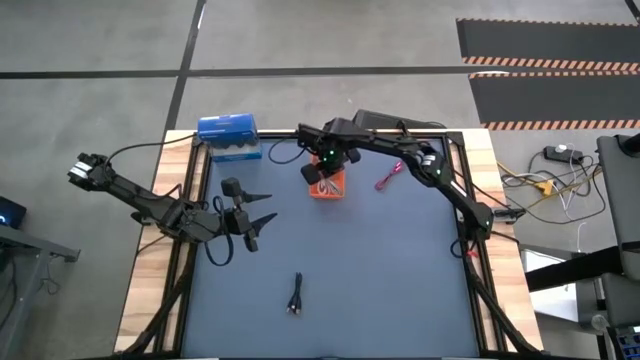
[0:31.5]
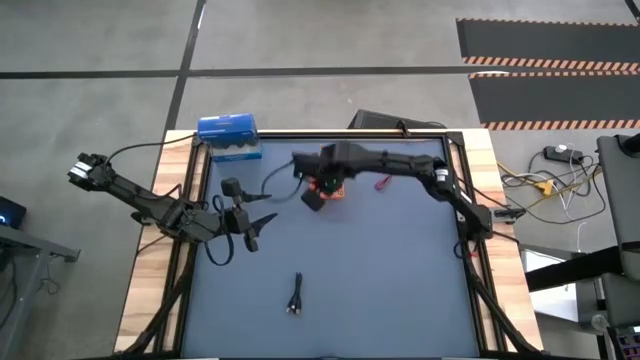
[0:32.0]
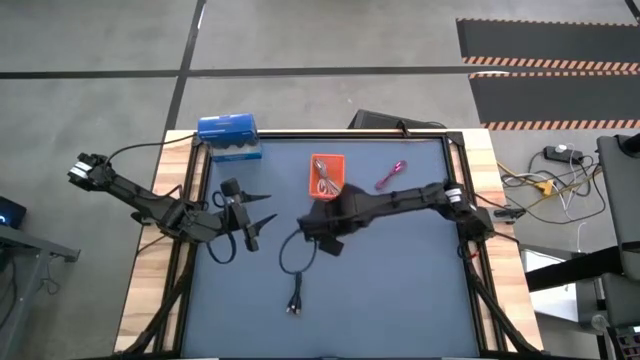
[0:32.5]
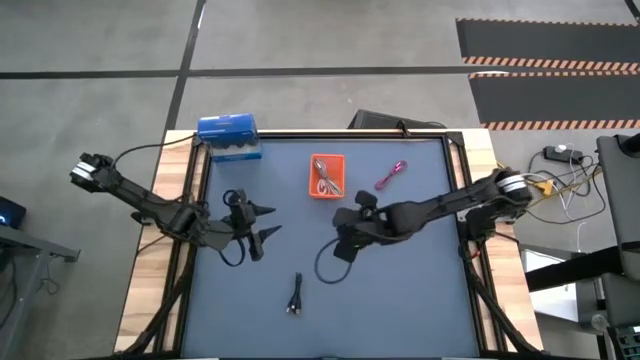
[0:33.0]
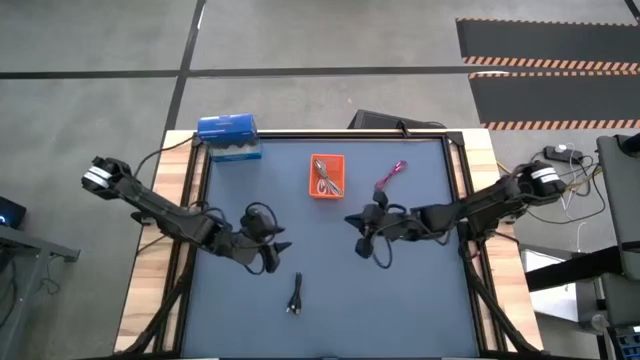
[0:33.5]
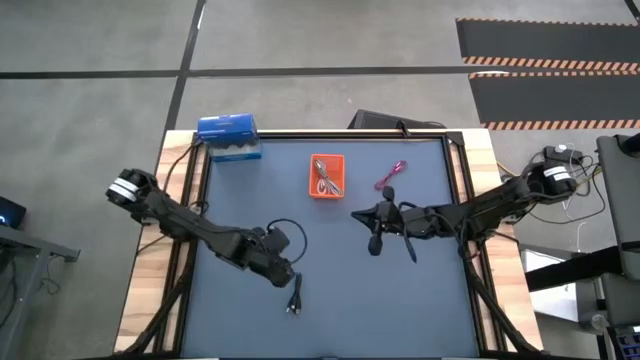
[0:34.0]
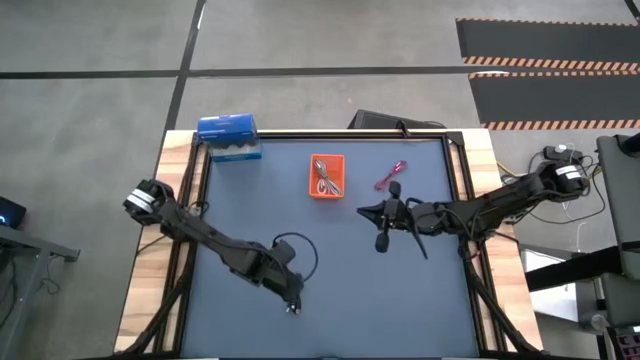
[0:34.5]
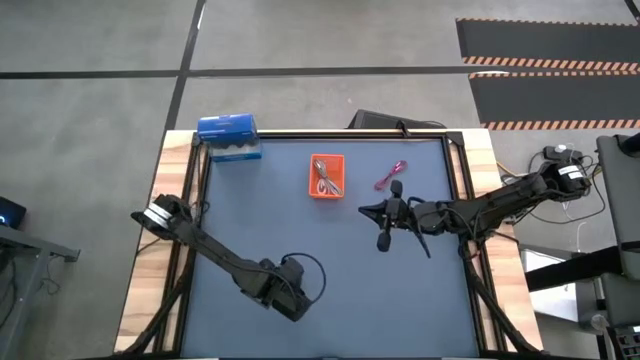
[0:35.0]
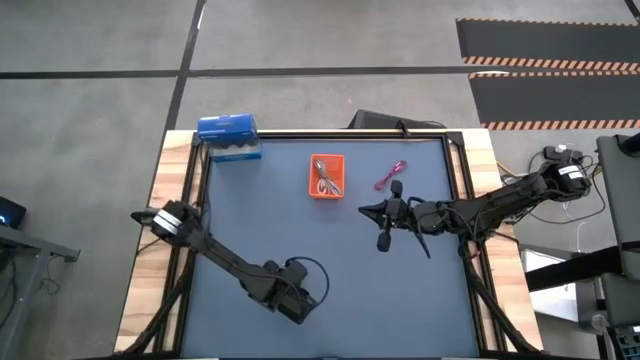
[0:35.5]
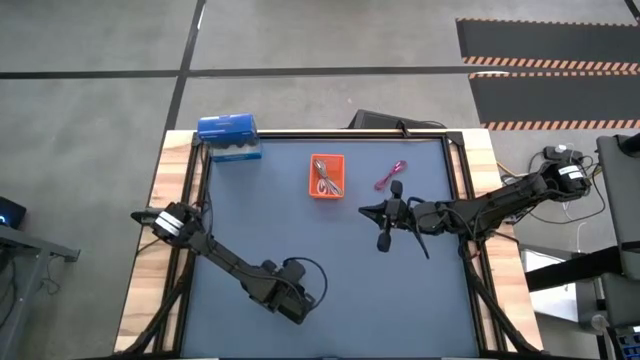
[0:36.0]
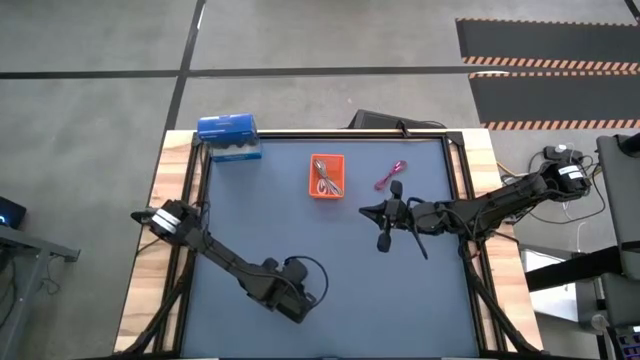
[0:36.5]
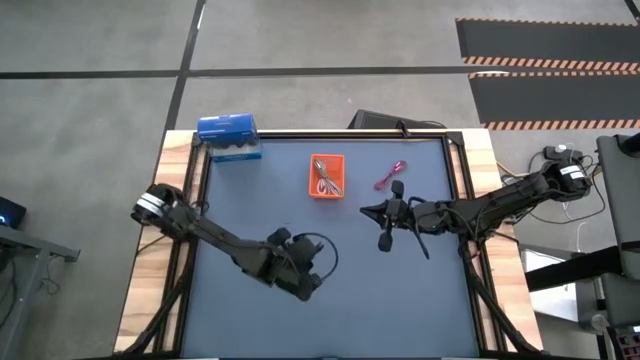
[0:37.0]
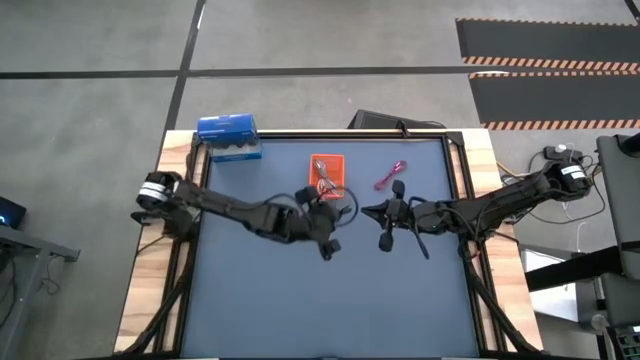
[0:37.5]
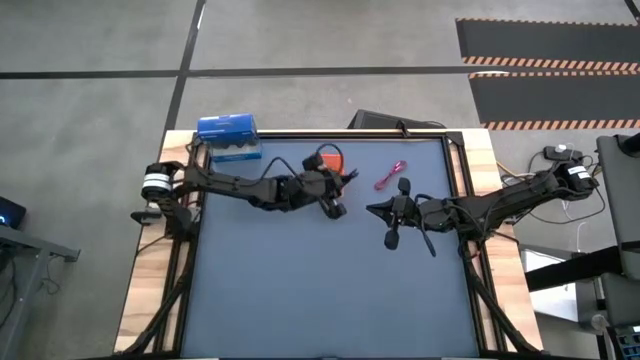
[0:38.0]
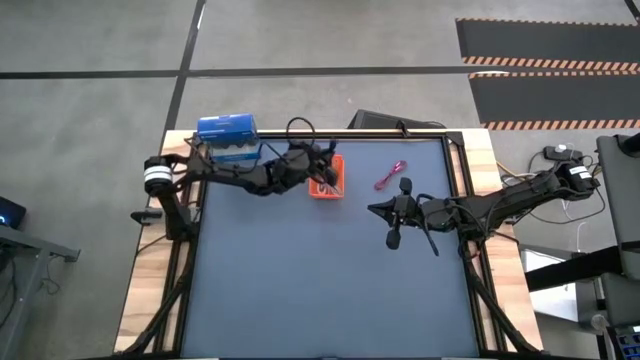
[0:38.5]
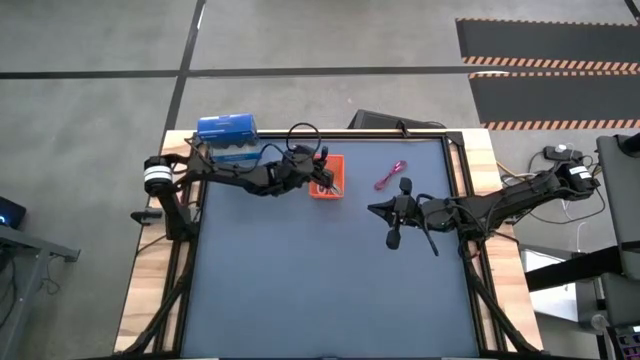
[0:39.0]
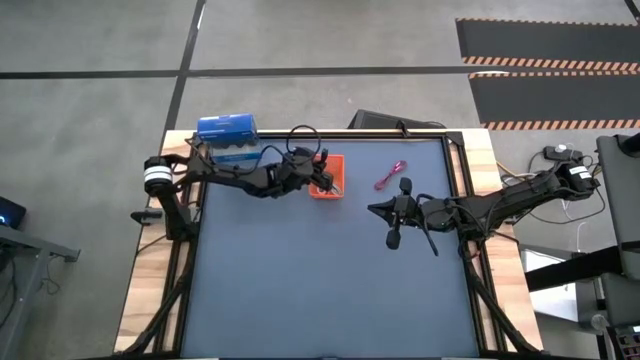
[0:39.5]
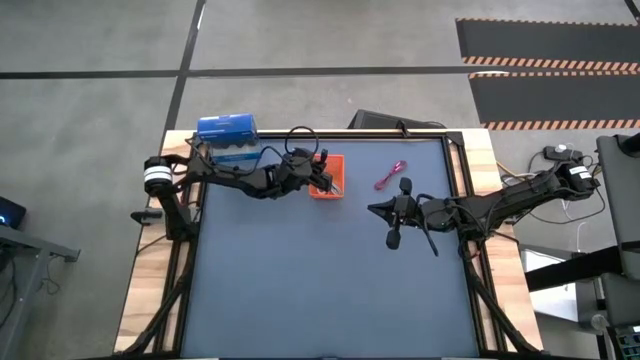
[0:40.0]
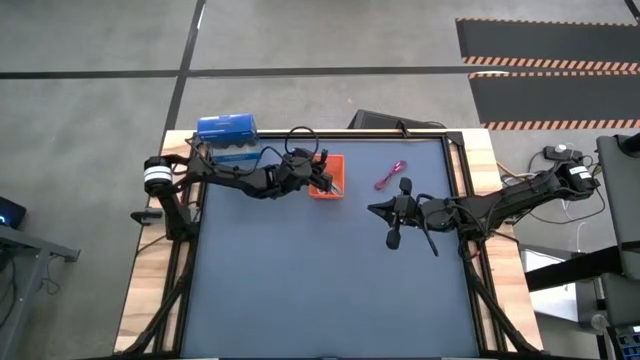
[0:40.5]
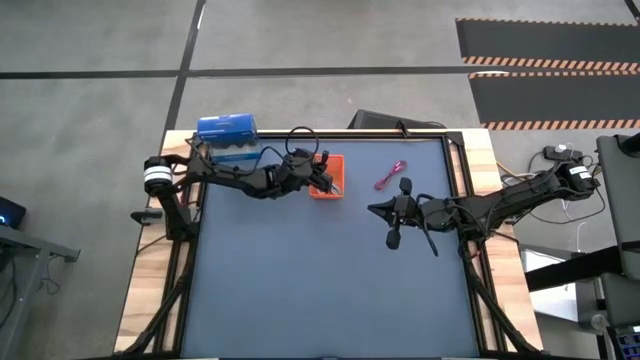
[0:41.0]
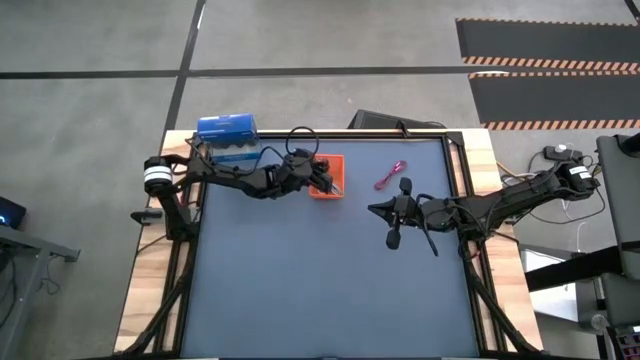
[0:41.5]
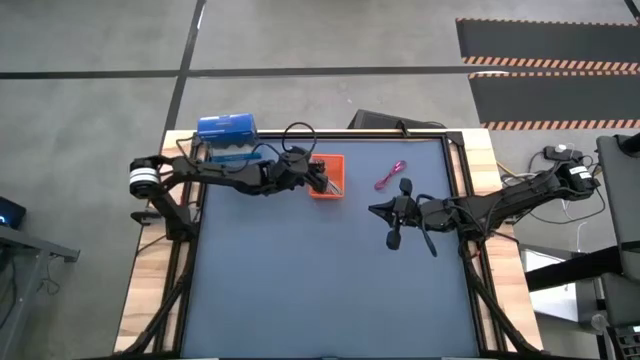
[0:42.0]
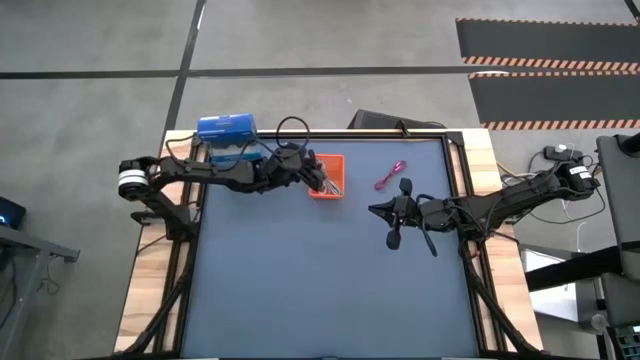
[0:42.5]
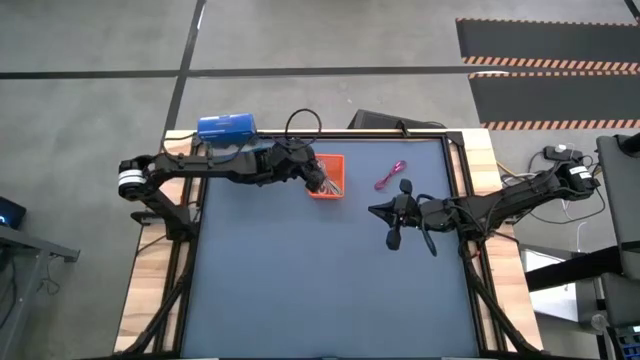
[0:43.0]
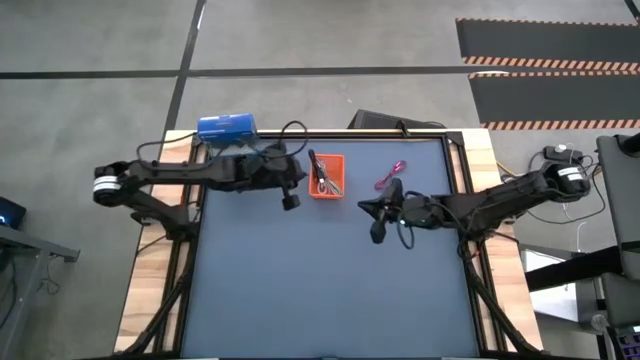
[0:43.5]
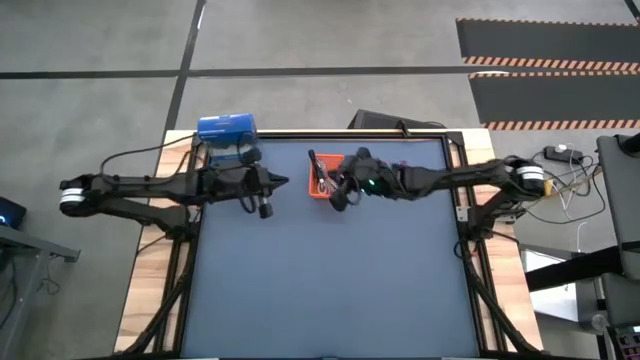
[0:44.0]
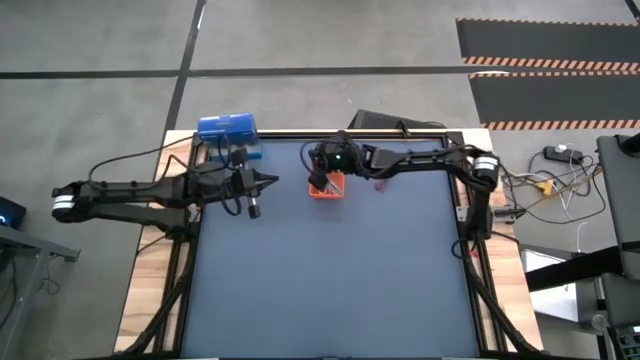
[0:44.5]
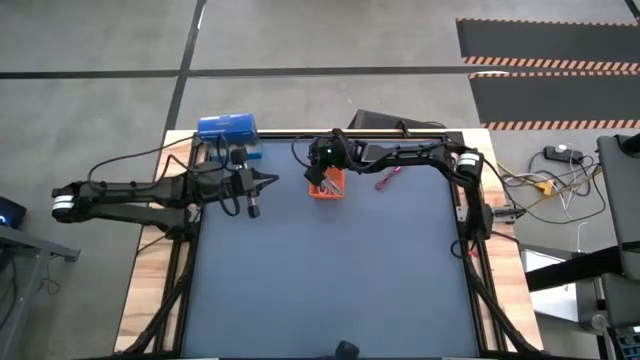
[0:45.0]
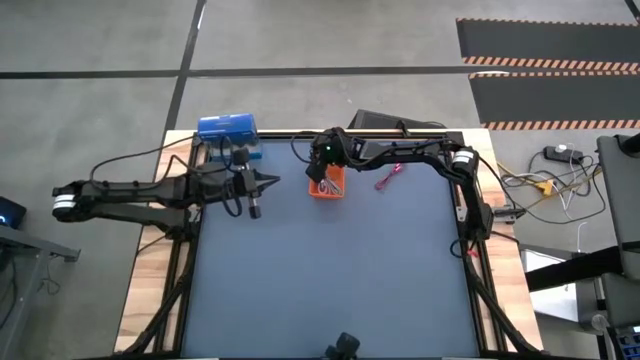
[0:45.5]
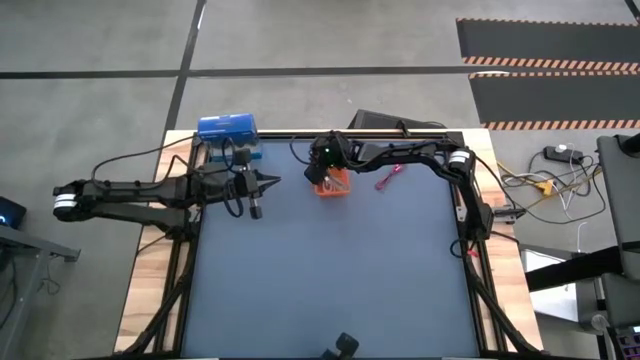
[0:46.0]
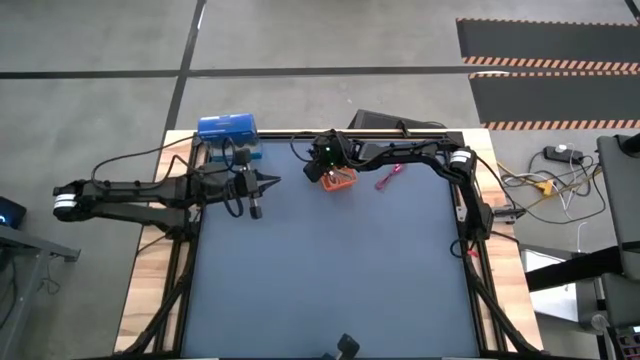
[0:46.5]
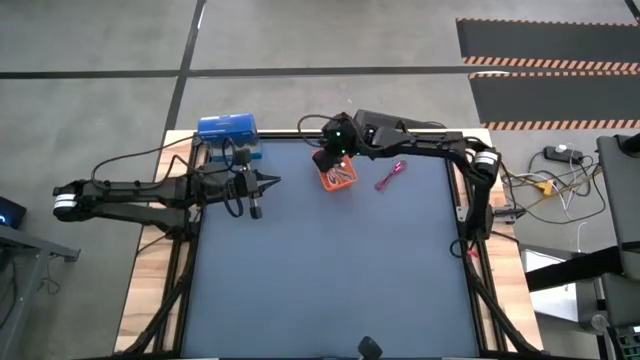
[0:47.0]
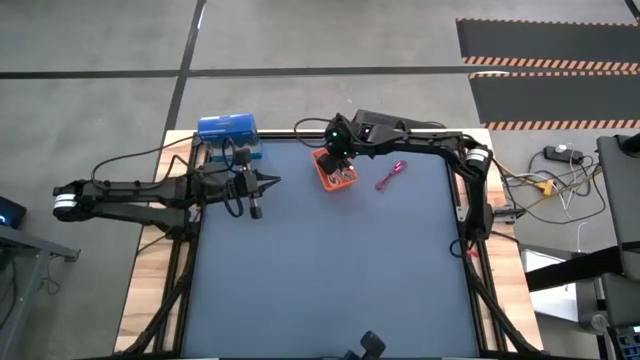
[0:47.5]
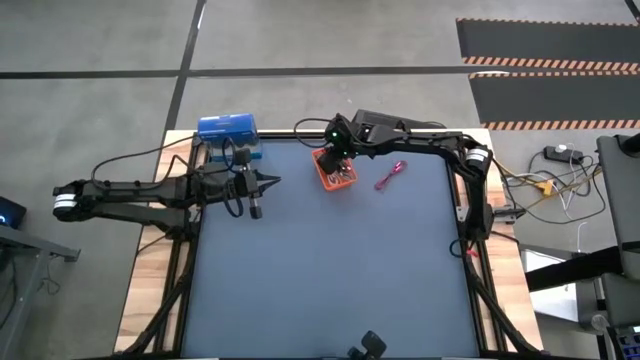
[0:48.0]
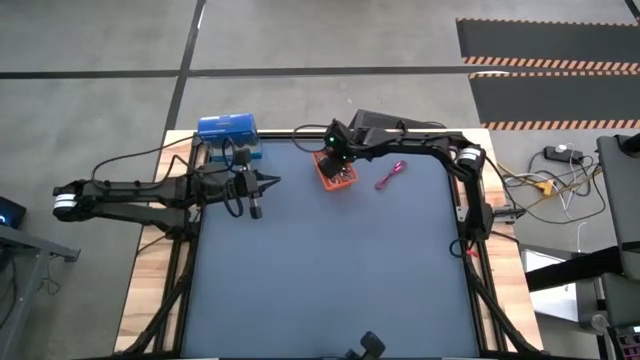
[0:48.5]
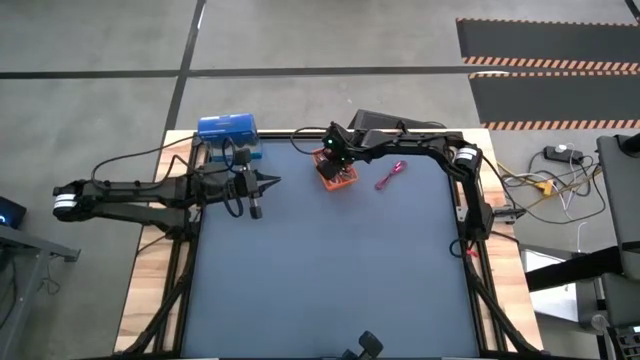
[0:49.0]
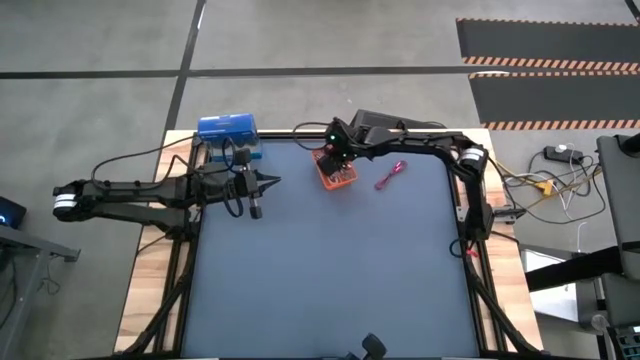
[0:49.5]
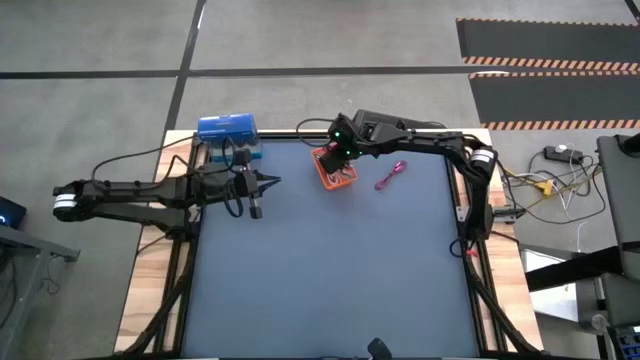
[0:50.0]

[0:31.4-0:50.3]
Task: Pick and place USB-C Cables
Put the black charger cable into the orange bin

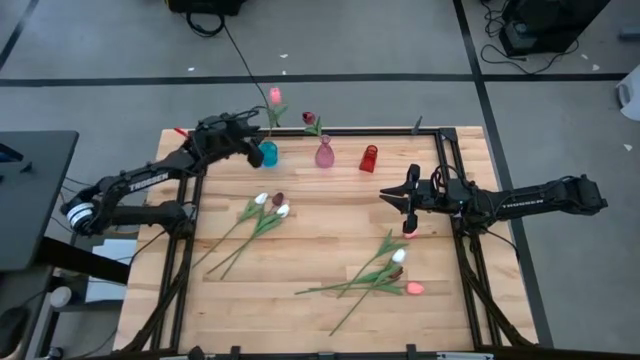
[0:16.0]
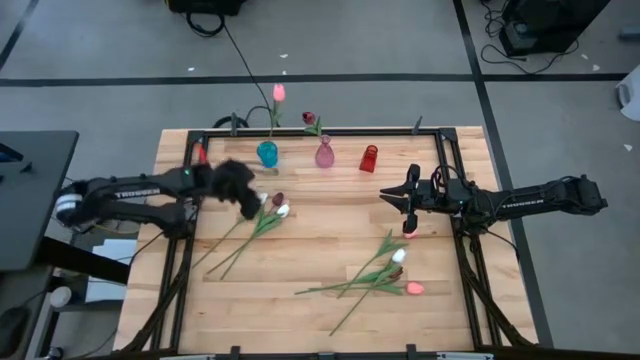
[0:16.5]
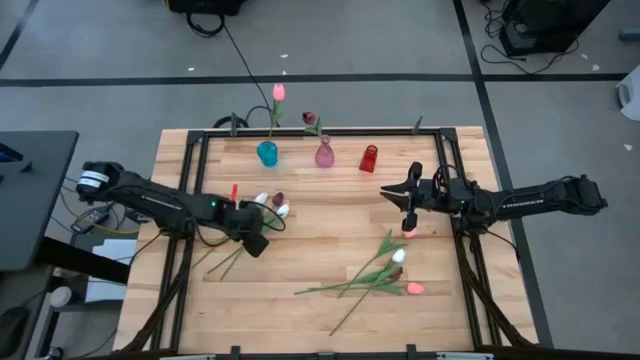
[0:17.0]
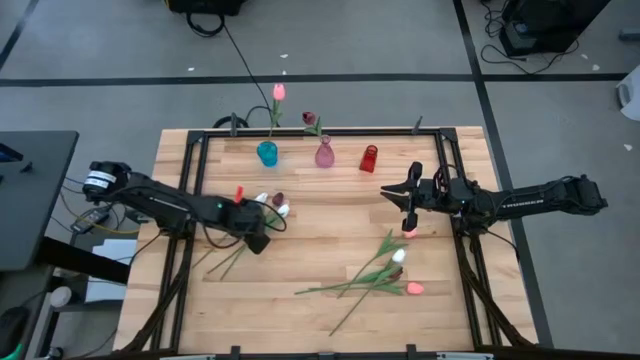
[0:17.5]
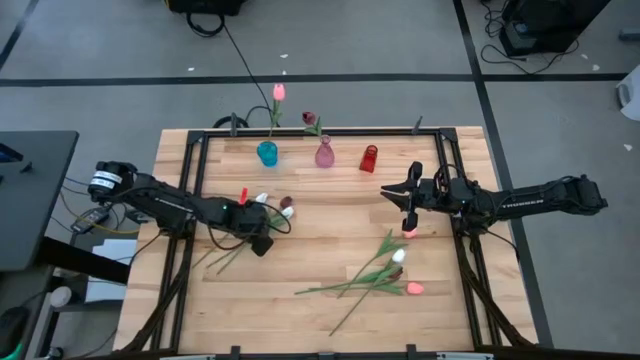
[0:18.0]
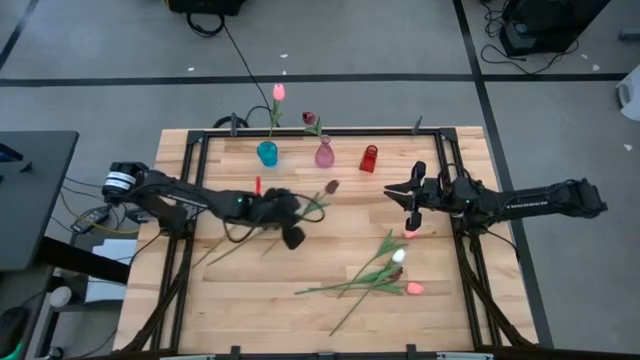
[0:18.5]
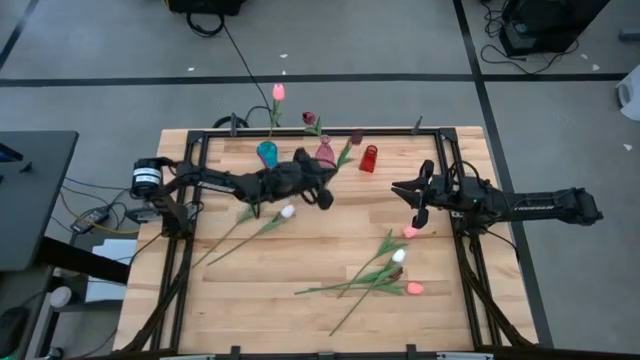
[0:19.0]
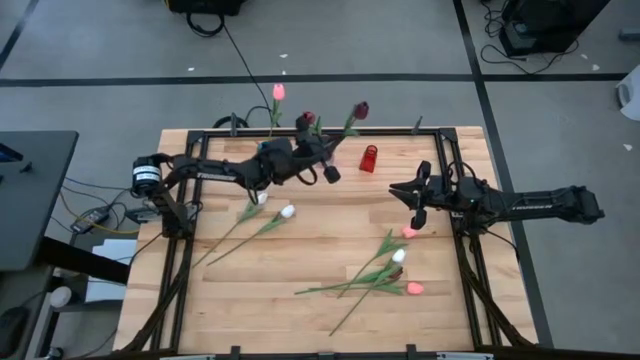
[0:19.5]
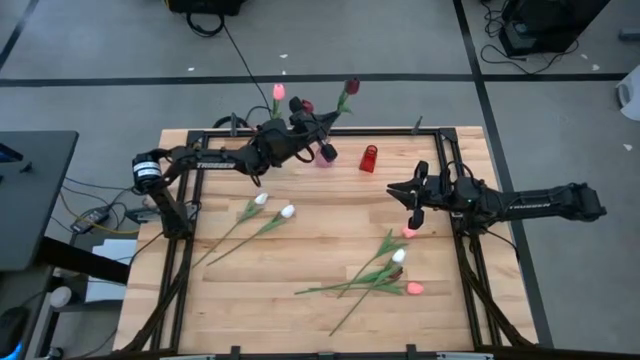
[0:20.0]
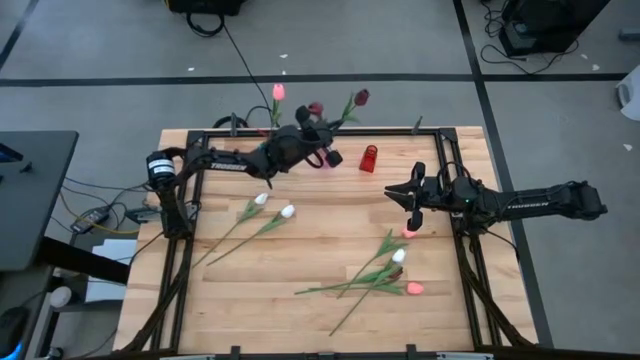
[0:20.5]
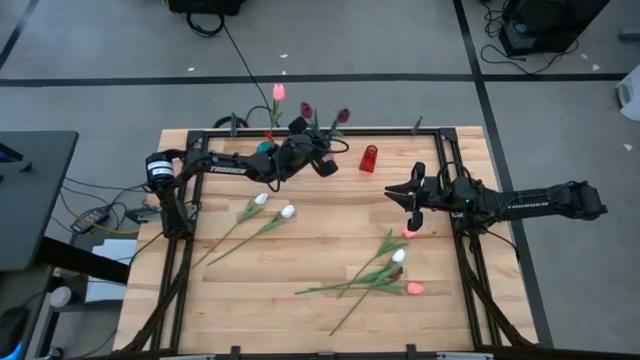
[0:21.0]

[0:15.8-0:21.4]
Task: Sort flowers into vase by color
Put the top left dark red flower into the violet vase
